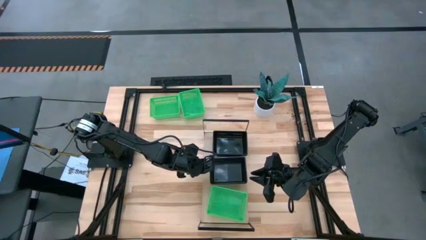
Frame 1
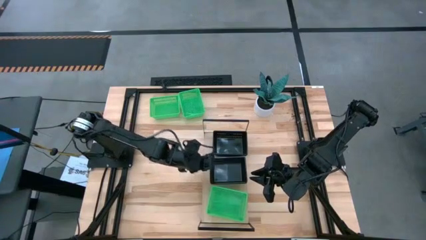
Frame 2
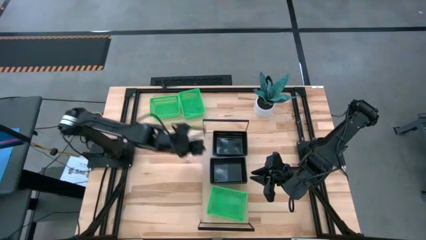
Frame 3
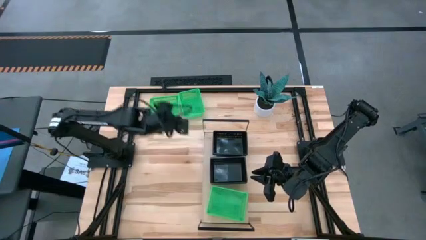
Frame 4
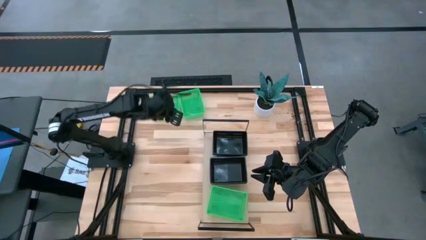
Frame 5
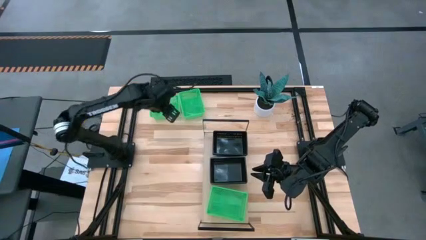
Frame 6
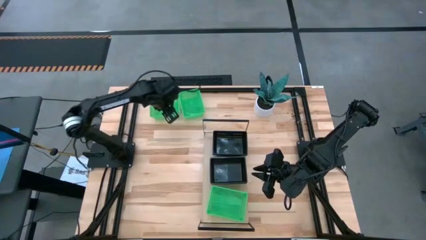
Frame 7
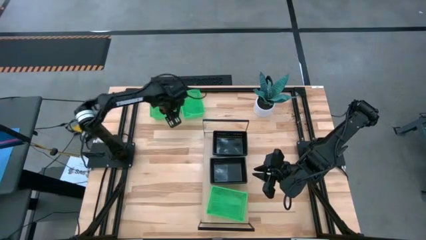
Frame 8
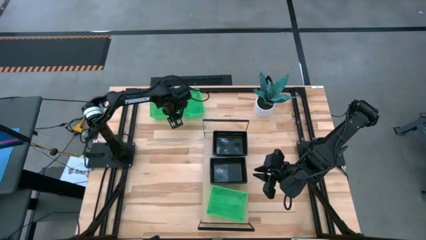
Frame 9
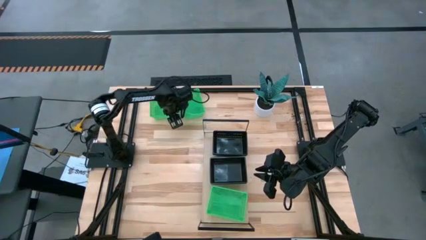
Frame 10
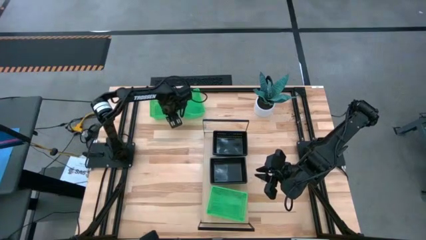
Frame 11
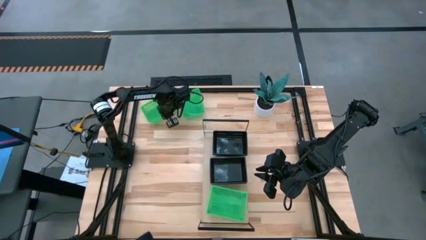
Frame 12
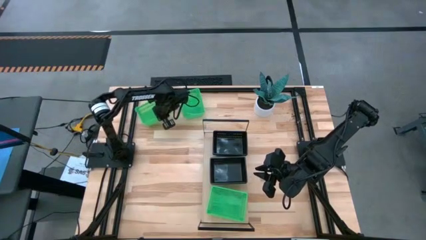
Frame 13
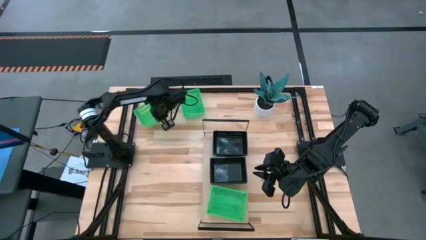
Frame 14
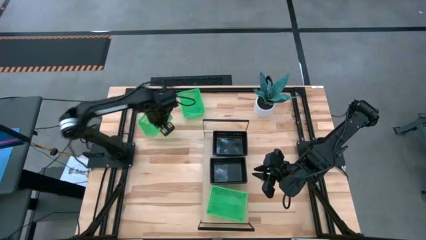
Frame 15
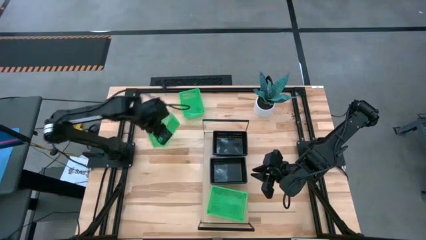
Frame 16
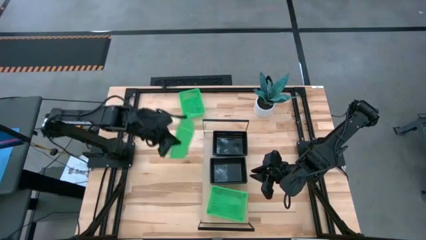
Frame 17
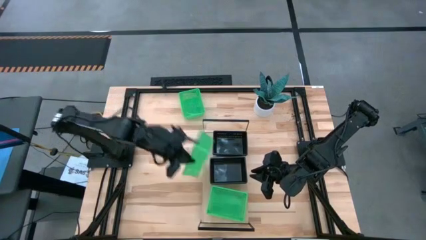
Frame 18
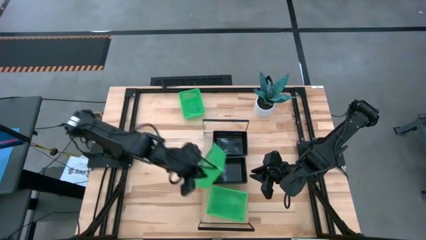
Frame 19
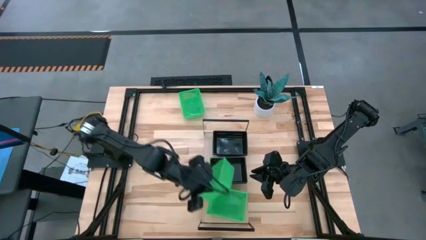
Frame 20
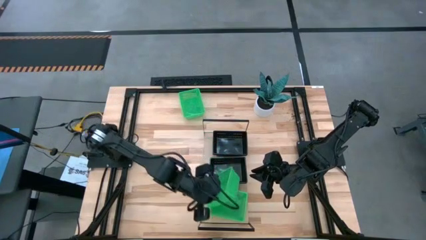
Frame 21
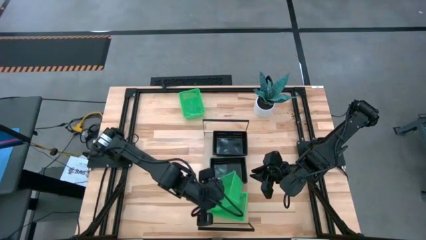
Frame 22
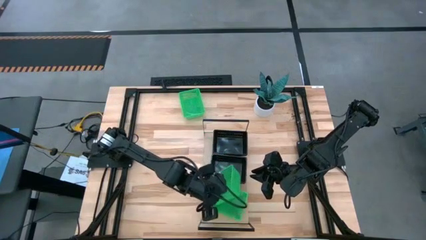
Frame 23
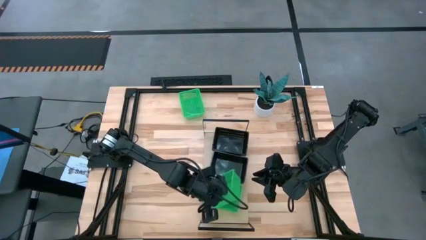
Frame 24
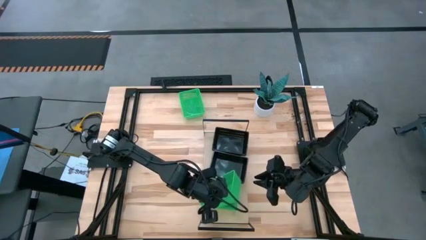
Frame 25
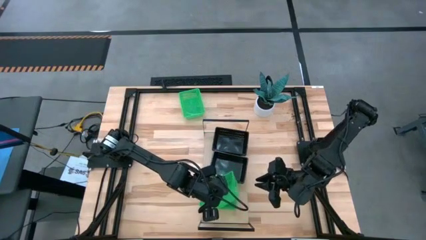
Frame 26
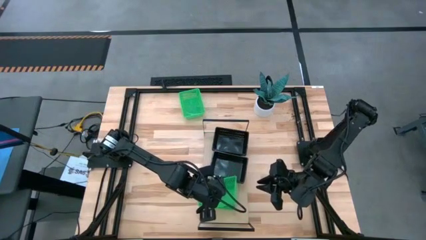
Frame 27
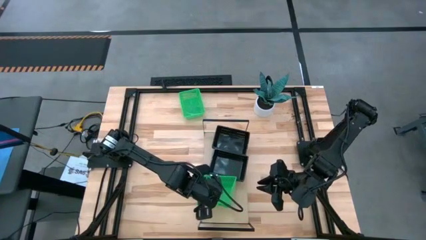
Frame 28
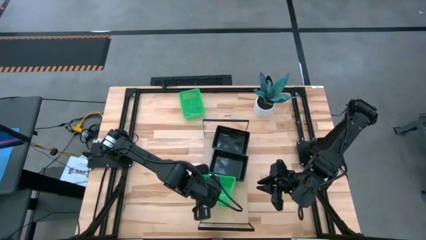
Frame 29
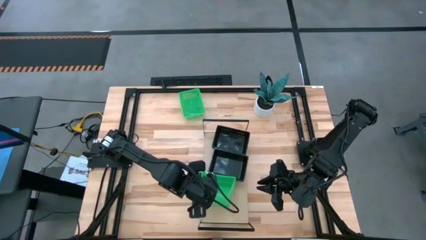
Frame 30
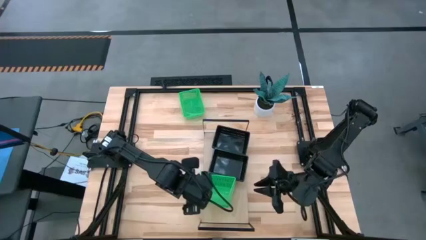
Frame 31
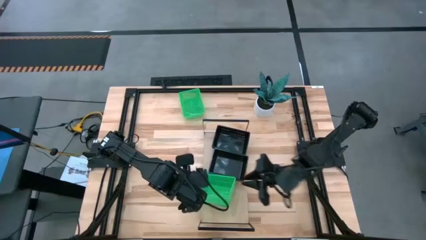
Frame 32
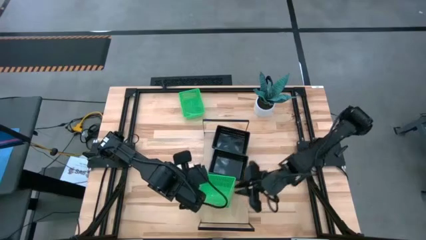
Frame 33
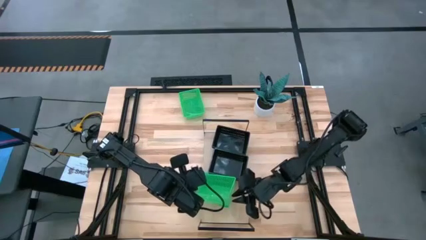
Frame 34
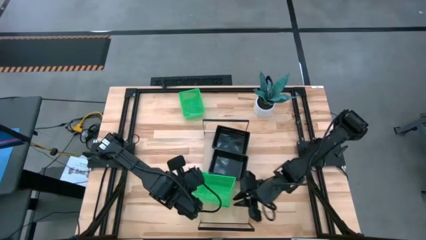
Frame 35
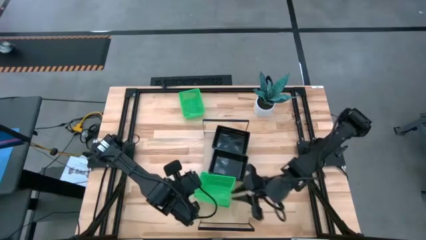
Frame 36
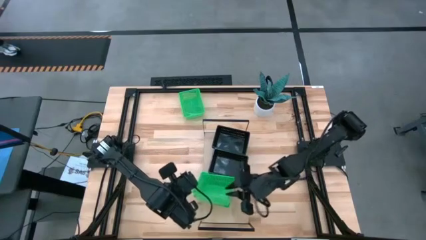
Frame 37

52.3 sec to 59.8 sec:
Task: Stack baskets on shelf by color
Stack the green bin on top of the green bin on the shelf

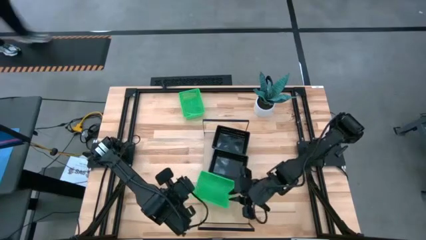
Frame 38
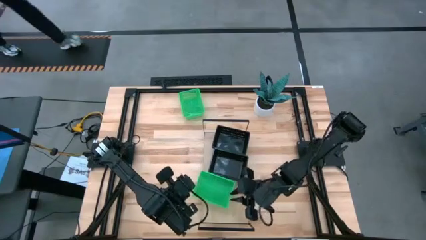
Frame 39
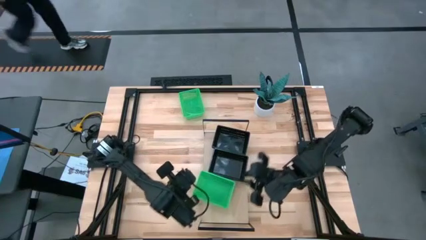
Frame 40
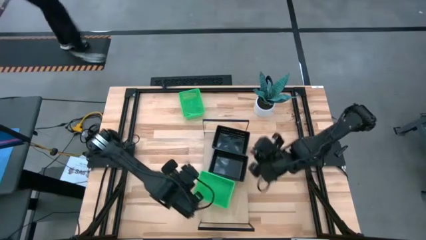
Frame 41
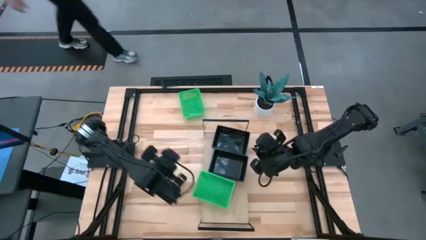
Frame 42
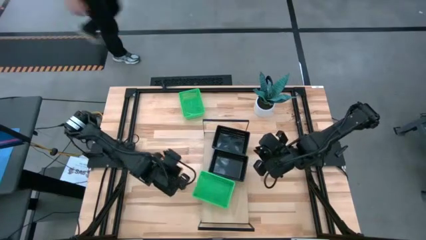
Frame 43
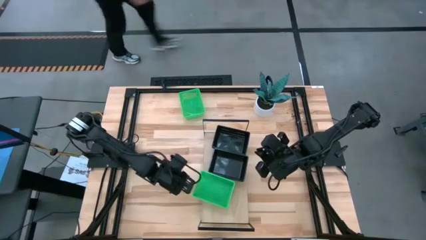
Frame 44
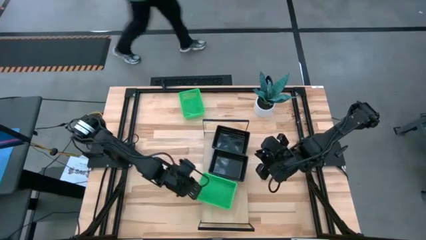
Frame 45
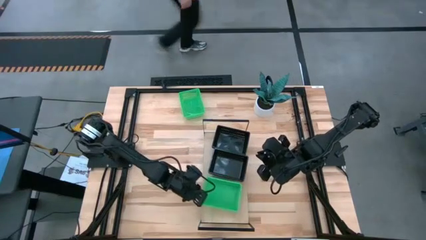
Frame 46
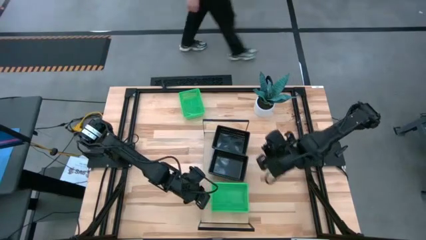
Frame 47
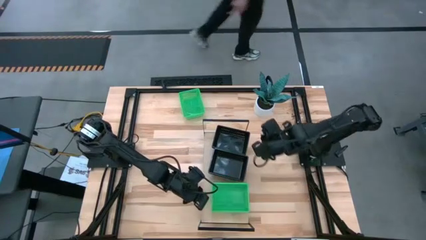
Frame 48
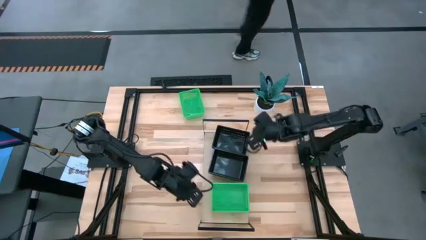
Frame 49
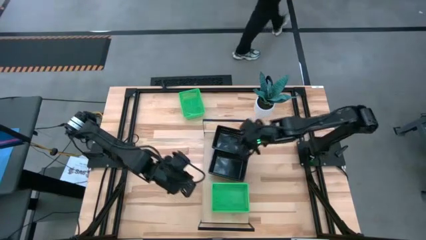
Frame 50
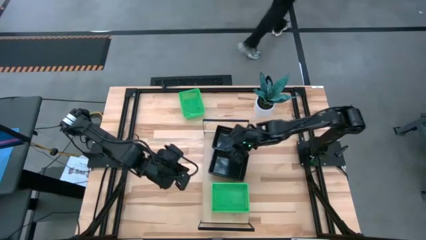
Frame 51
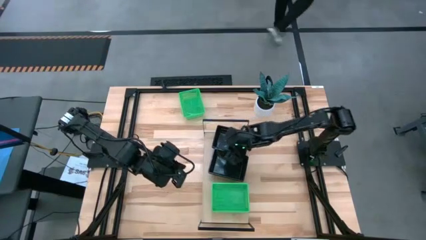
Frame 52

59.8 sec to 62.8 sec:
Adjust the bins on the shelf

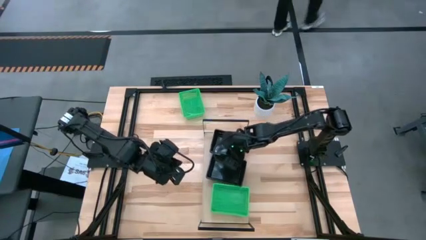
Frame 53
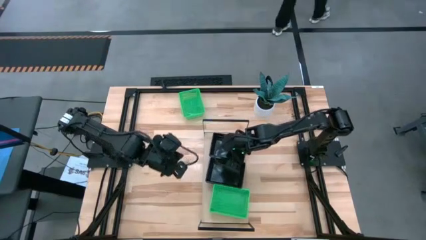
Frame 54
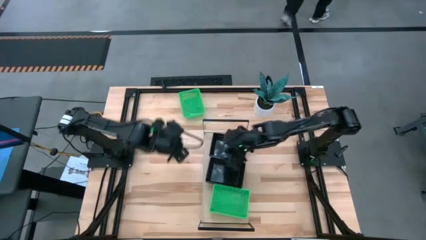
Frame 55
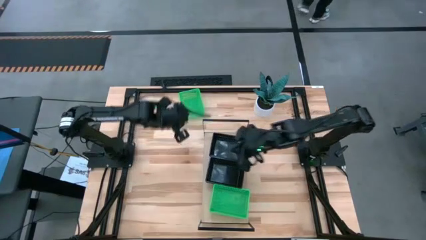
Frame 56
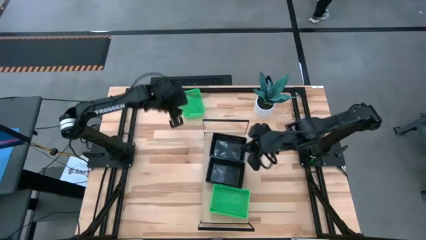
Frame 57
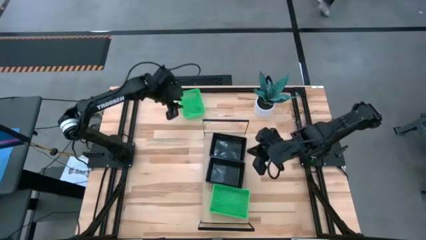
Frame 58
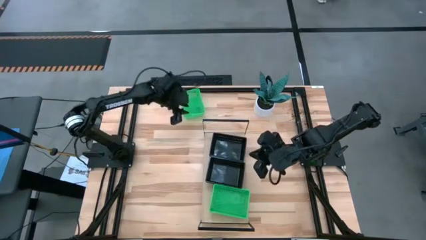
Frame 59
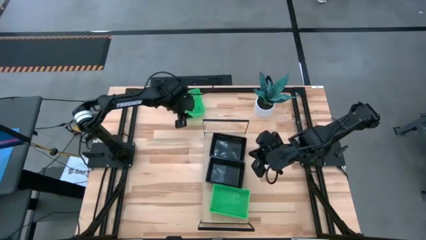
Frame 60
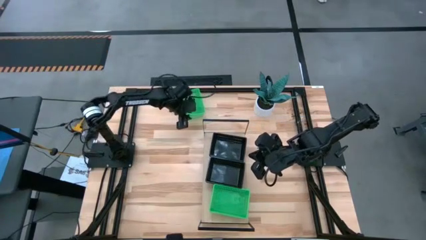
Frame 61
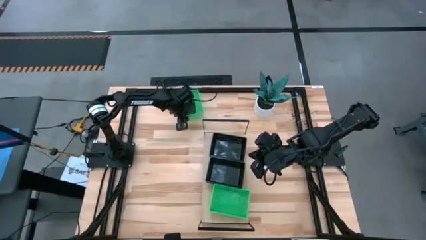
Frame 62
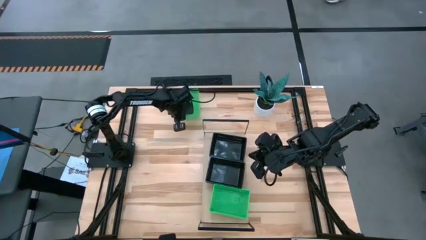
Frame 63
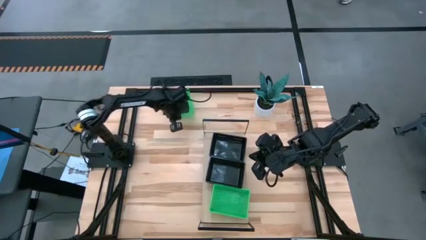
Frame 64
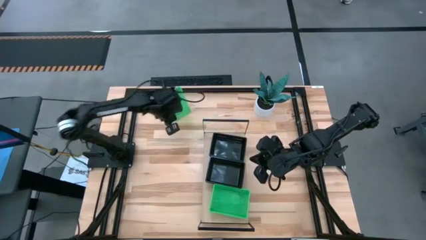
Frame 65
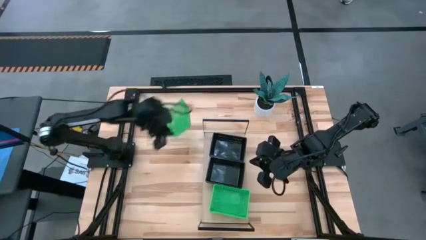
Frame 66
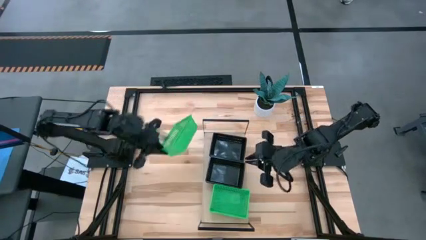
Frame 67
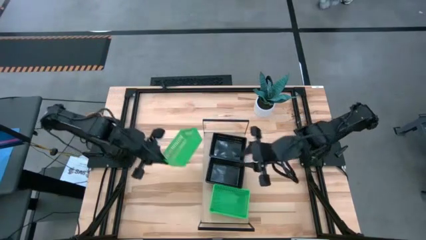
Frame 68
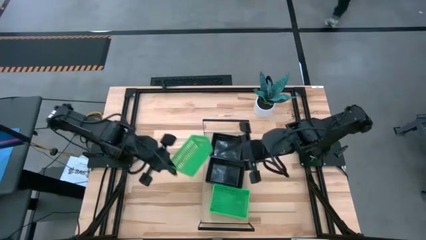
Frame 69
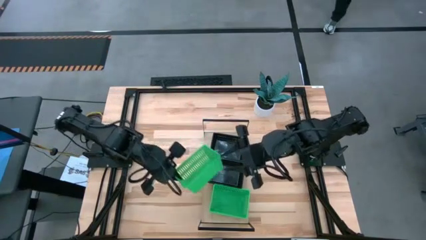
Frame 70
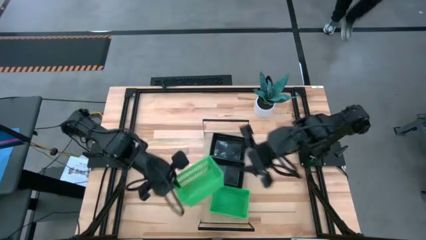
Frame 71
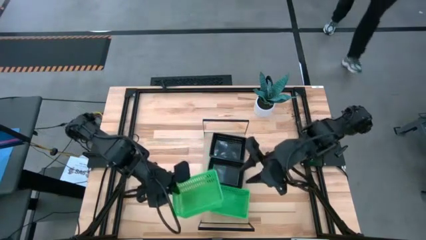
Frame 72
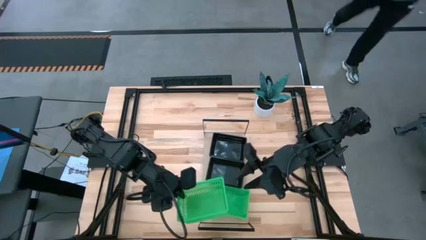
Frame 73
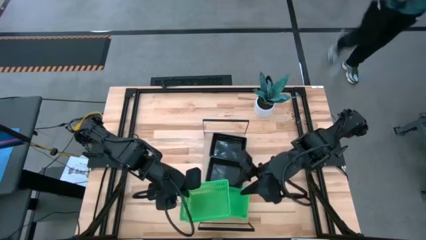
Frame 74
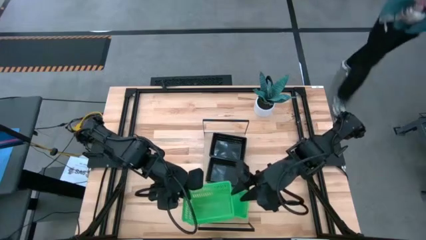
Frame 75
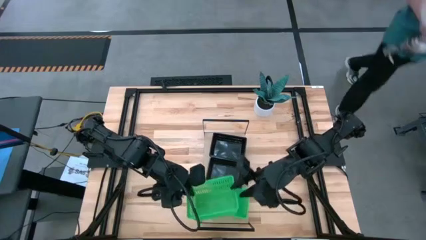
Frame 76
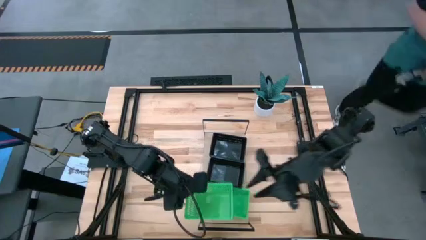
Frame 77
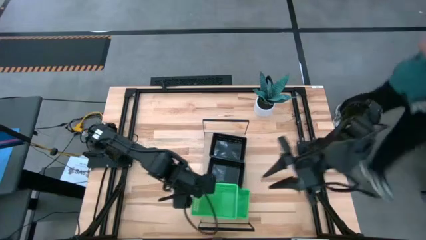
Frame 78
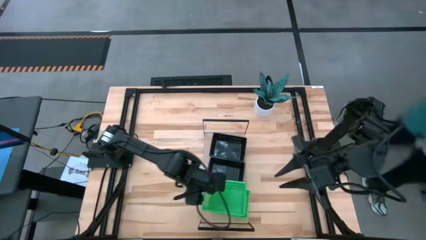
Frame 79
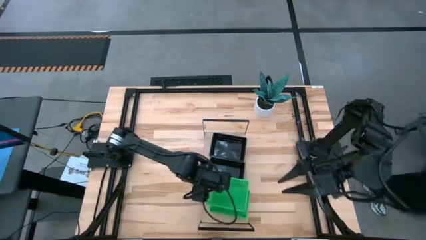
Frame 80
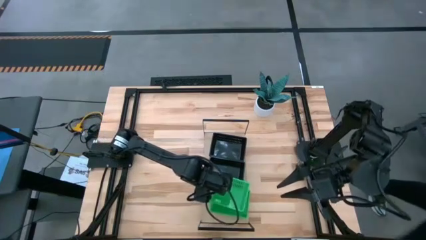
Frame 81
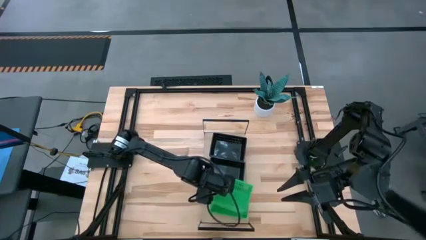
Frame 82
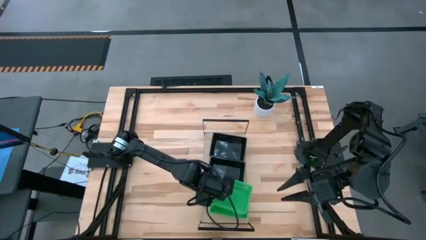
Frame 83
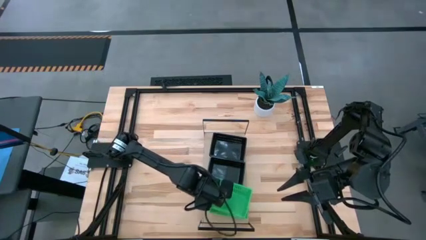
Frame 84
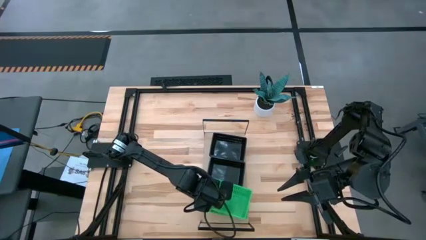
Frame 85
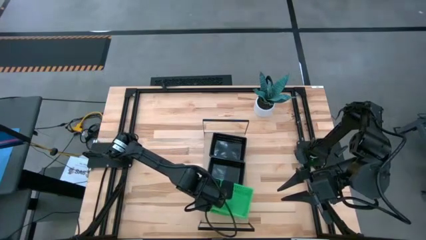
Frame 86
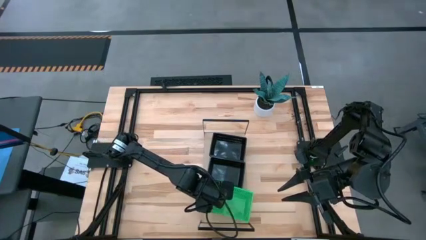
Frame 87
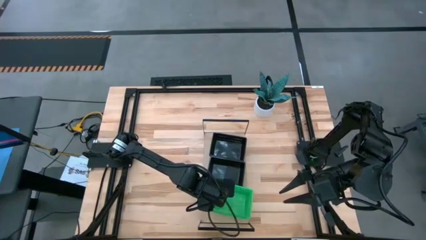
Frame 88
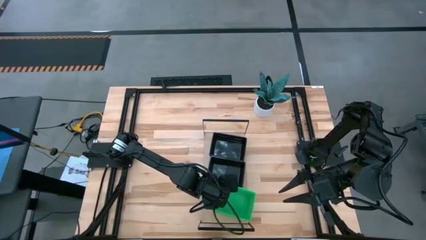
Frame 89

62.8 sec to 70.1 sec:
Stack the green bin on top of the green bins on the shelf
